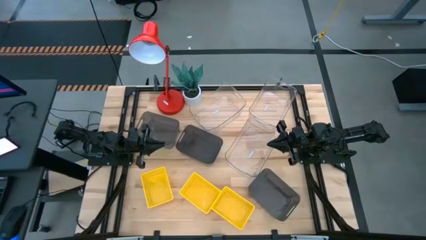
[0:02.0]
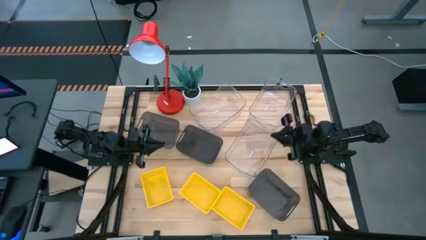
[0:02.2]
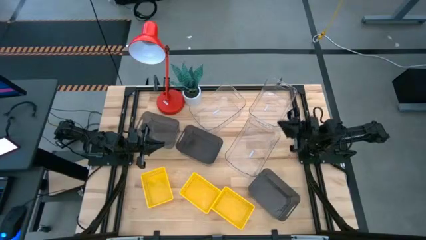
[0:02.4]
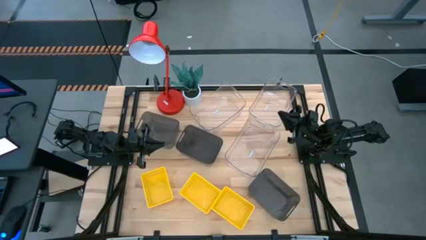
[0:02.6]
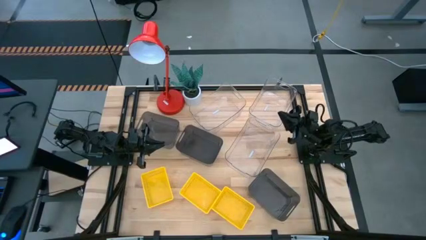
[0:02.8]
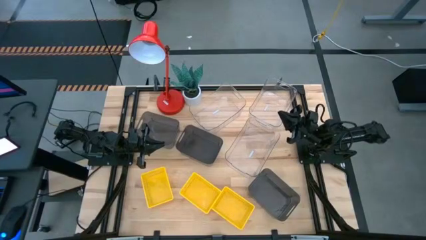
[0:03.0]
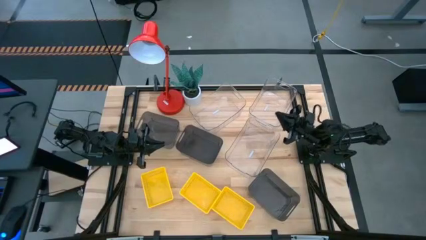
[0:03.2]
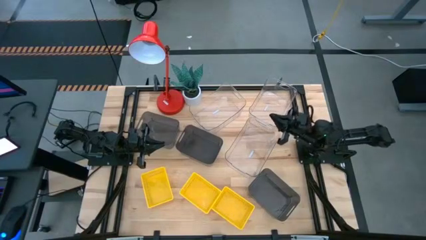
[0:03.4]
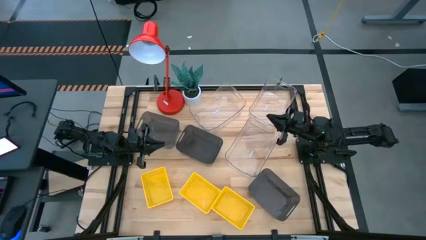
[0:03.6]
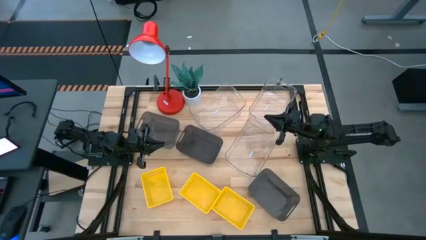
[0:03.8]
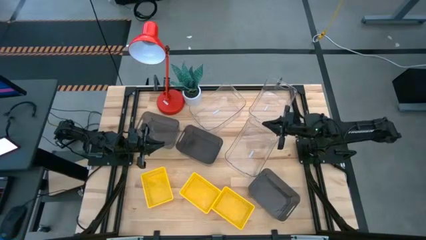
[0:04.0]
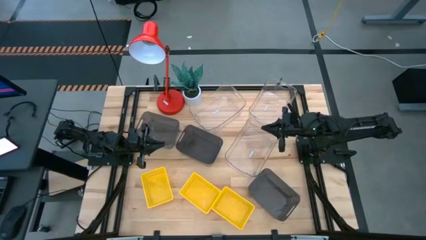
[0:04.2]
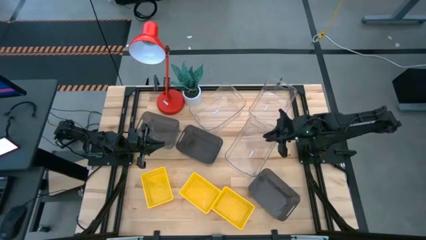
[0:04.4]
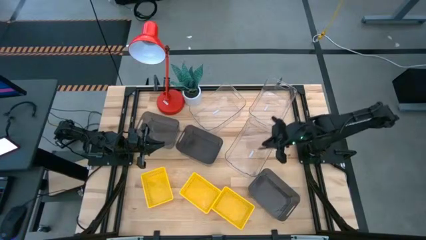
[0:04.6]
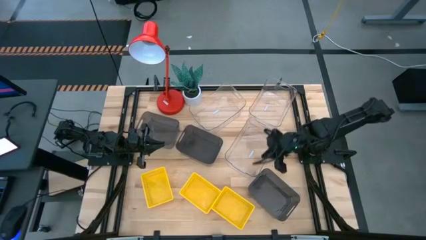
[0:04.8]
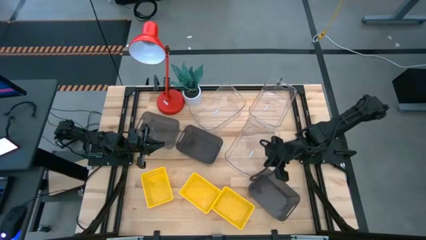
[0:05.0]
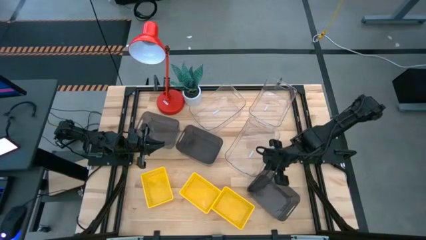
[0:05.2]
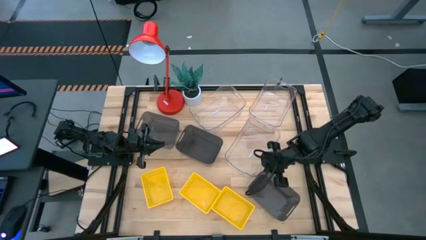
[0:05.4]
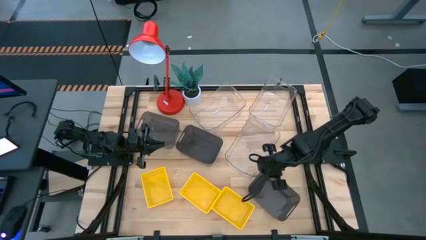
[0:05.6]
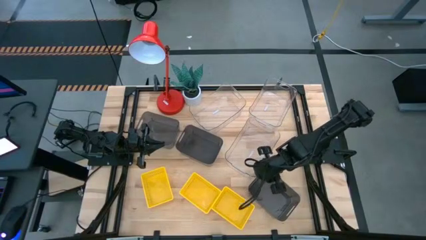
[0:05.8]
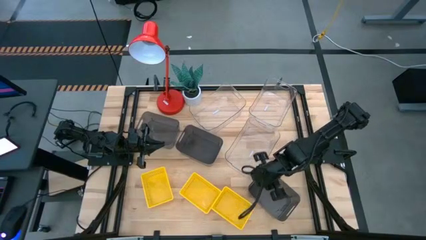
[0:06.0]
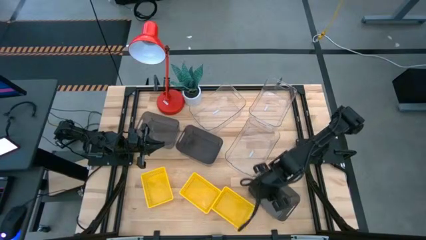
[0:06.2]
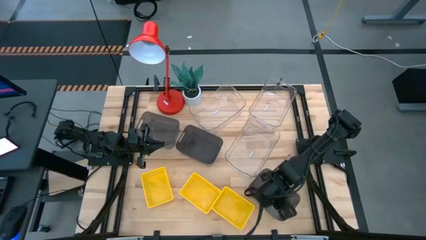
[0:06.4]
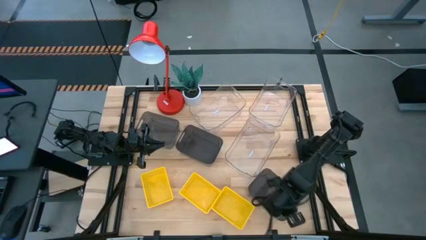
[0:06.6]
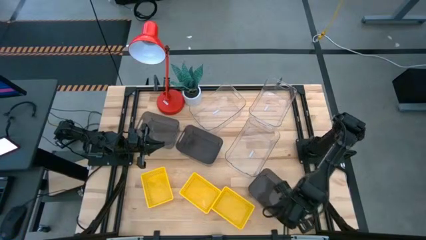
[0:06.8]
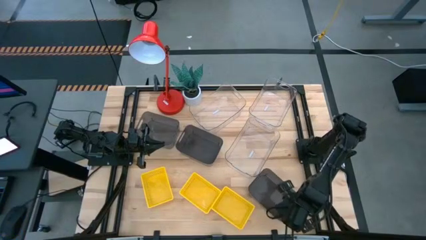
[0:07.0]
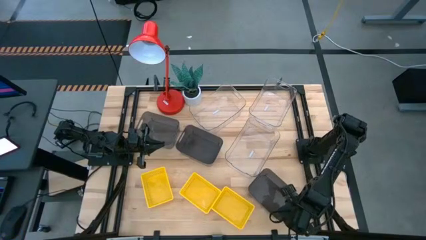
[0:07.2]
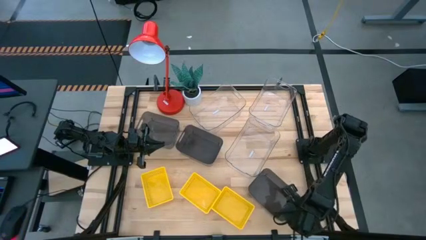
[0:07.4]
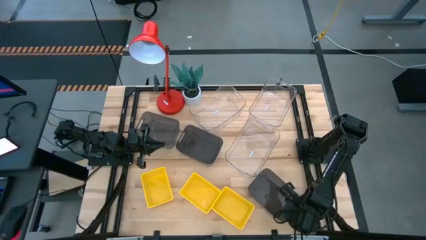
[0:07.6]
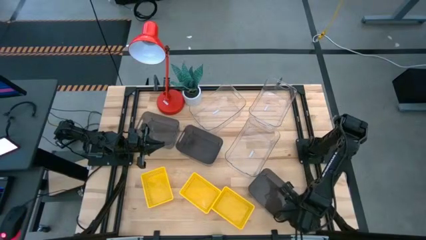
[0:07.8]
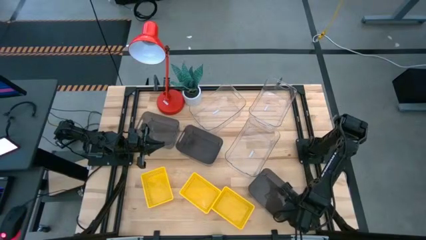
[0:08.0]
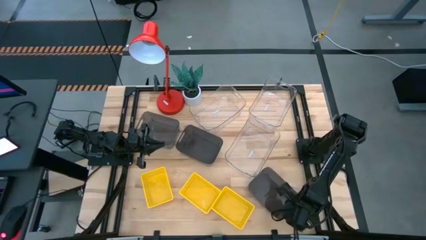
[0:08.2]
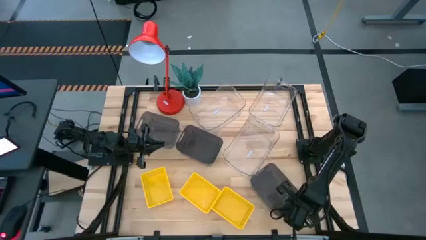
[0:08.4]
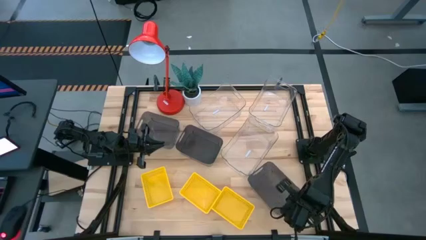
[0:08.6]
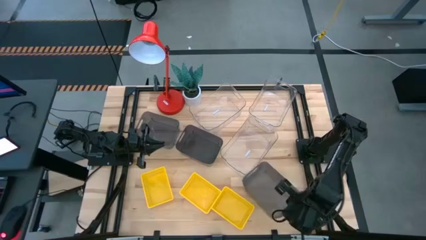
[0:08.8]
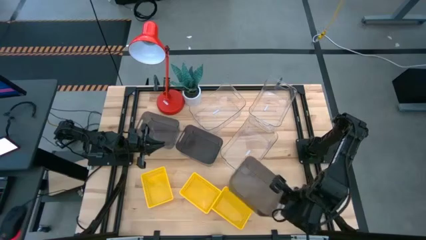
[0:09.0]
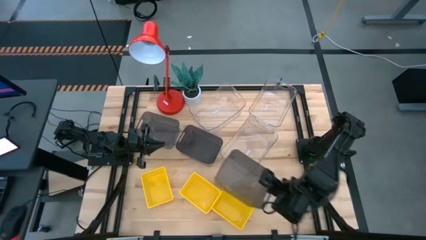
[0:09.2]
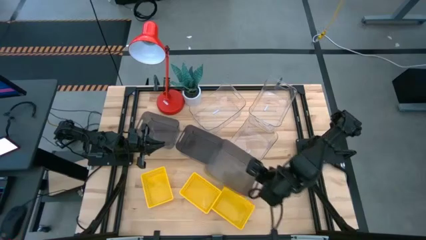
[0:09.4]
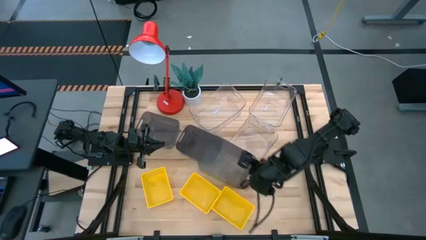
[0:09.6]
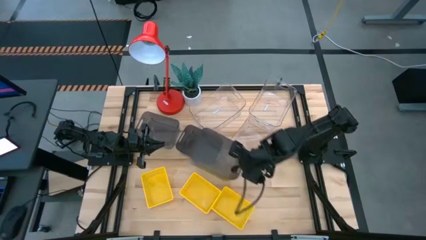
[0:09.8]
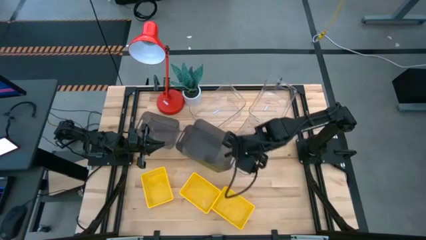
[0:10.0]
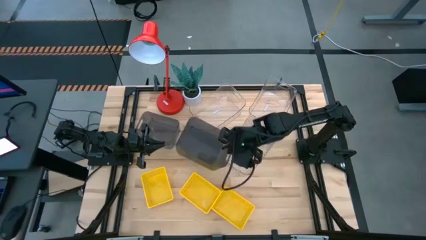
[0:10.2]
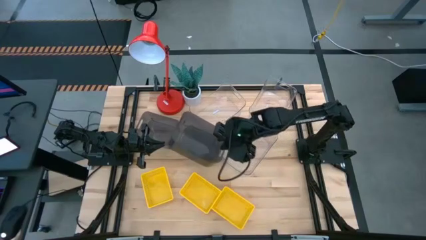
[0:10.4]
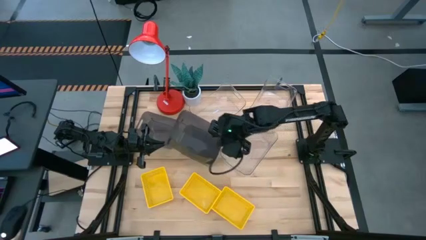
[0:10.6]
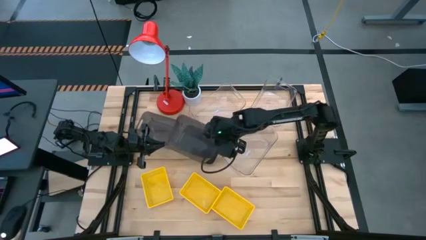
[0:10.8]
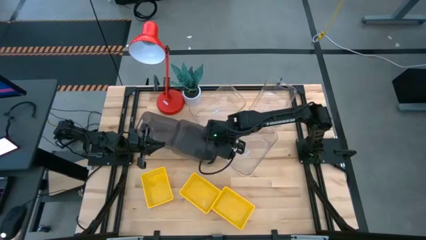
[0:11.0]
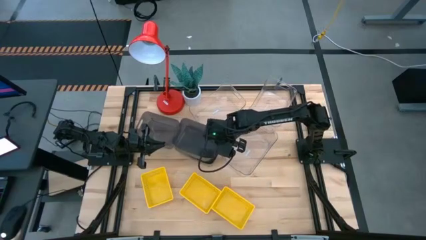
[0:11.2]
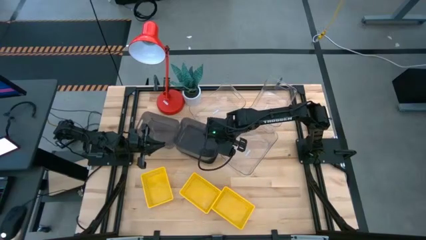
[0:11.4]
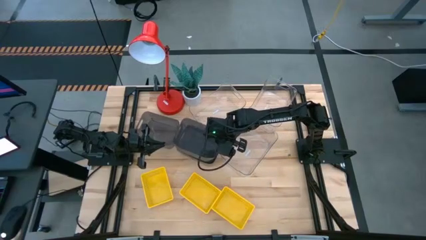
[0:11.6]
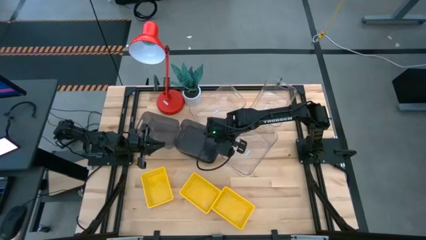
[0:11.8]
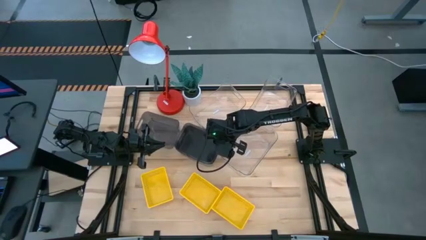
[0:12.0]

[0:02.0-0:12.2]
Stack the bottom black bin on the middle black bin

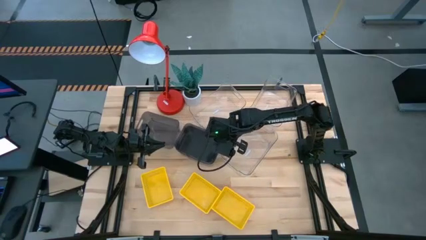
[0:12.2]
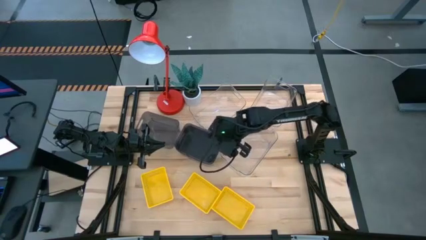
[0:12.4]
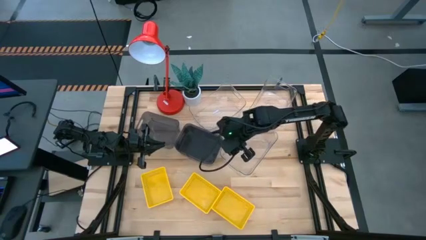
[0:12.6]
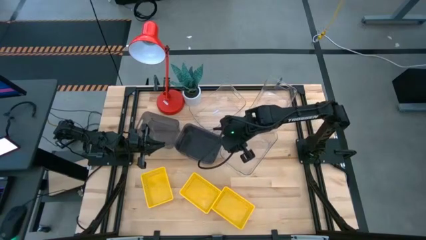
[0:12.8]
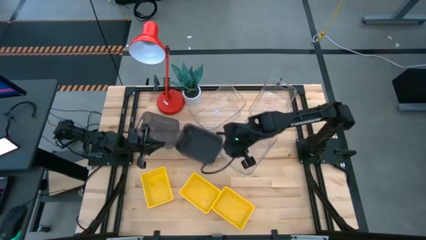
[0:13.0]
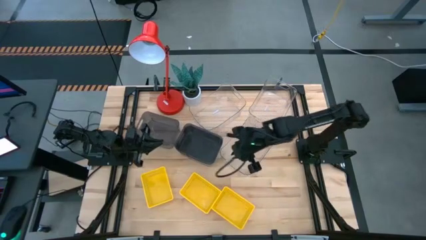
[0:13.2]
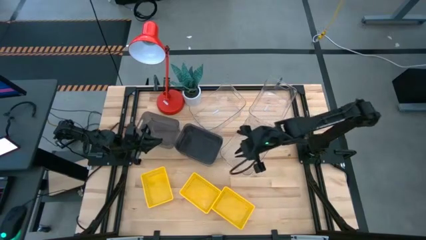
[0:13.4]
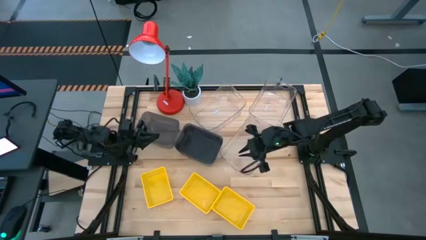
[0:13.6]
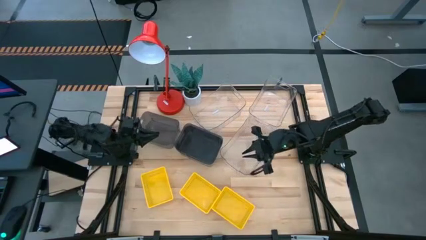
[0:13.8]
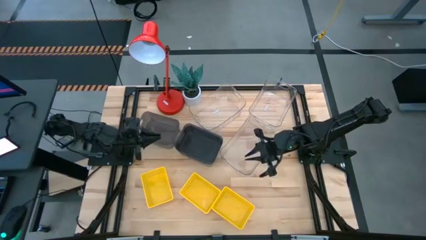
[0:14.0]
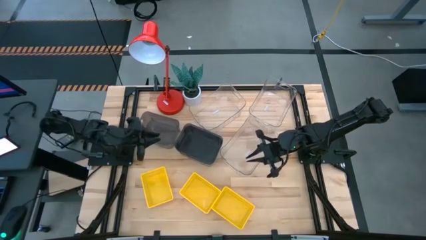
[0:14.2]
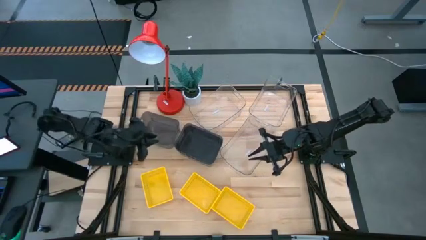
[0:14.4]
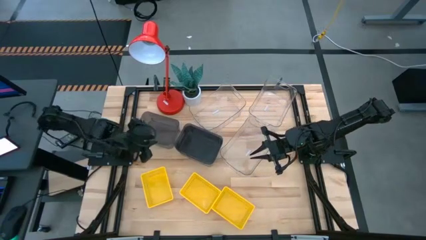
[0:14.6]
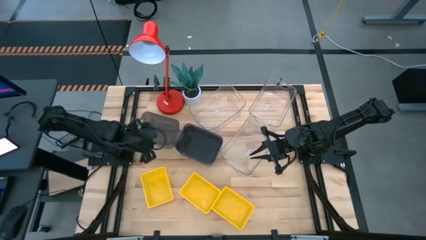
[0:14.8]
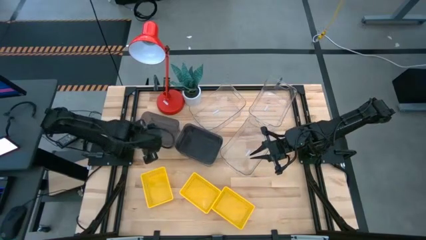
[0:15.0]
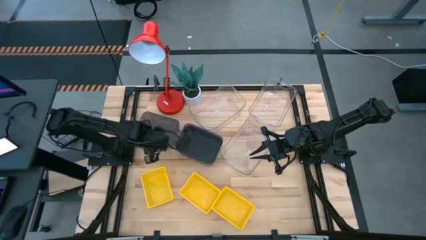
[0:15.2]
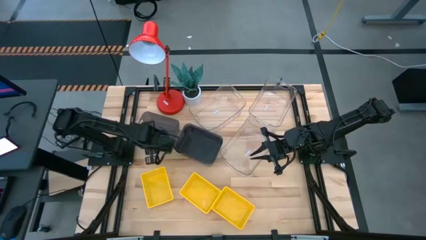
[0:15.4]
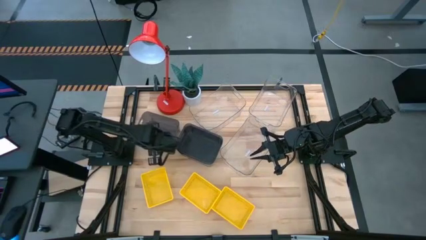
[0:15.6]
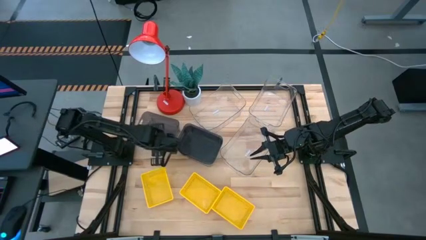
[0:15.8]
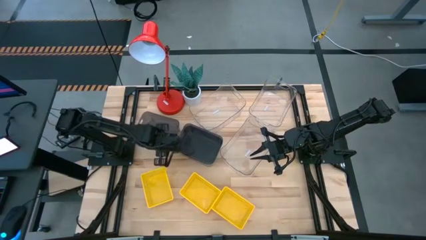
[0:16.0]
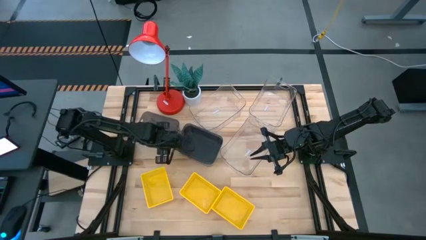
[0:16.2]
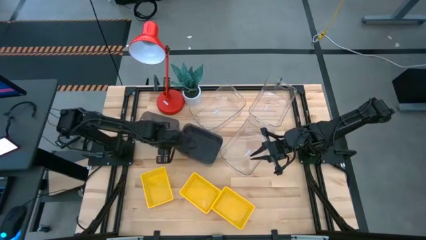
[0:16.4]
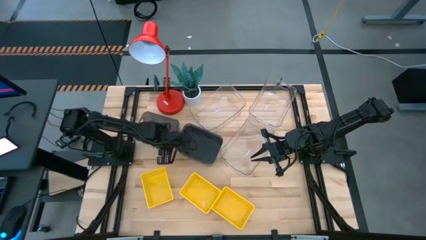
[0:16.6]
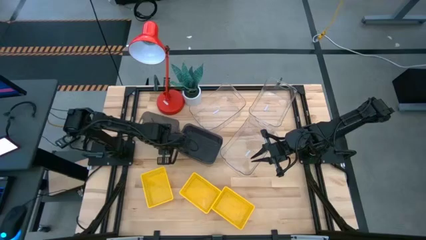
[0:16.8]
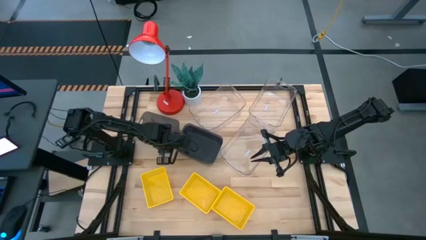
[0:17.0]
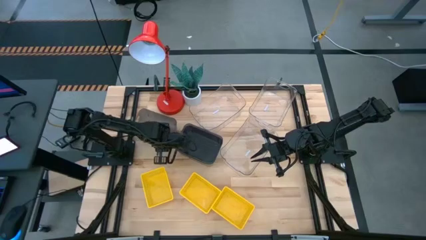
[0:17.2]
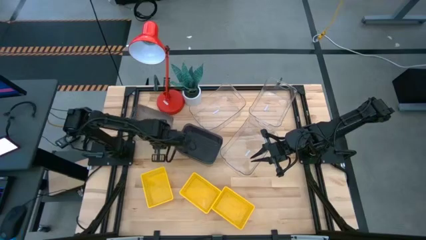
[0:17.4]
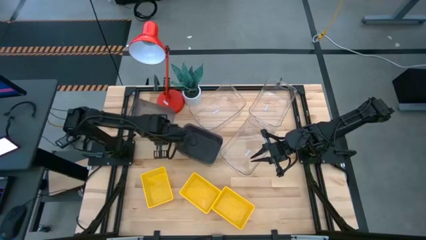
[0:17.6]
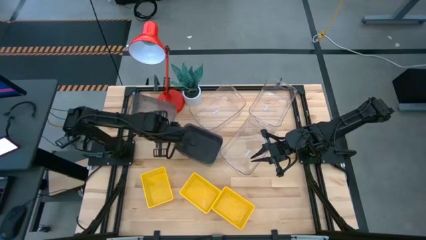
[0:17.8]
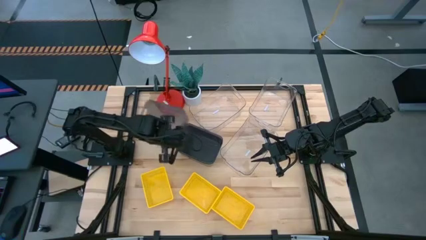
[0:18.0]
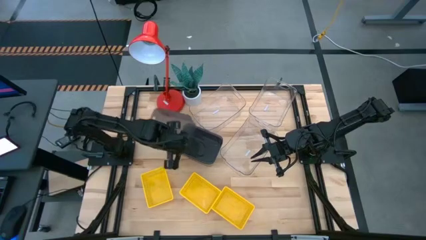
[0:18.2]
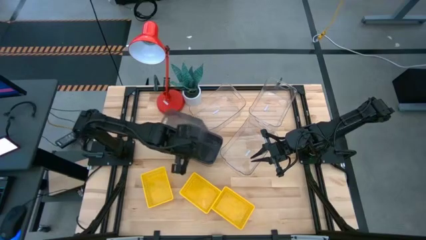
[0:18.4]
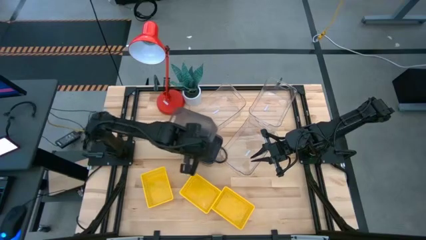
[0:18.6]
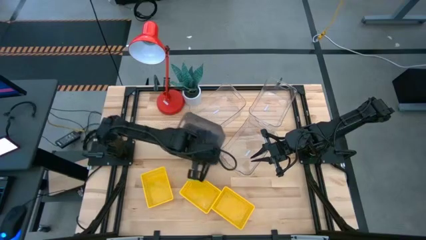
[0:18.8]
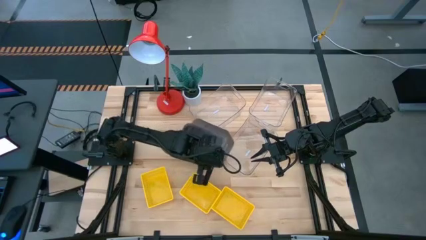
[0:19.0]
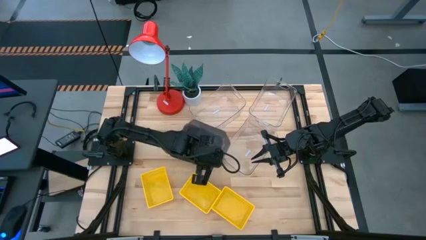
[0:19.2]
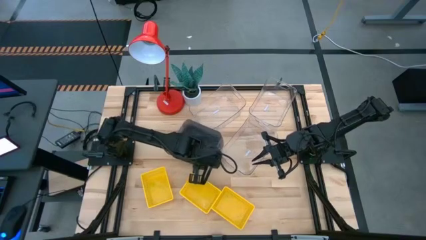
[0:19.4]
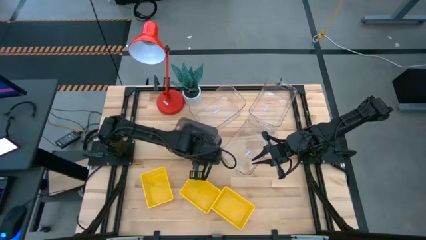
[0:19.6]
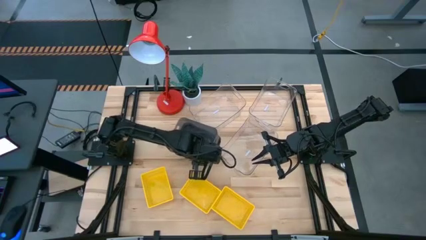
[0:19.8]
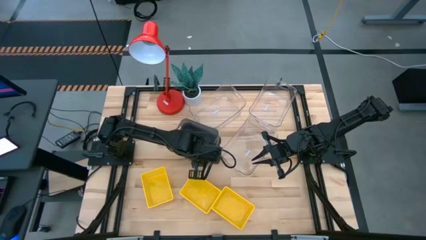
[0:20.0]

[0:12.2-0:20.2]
Stack the left black bin on the black bins
